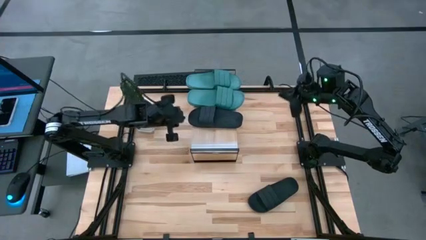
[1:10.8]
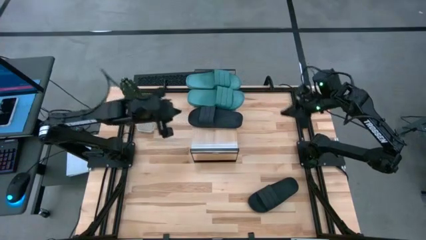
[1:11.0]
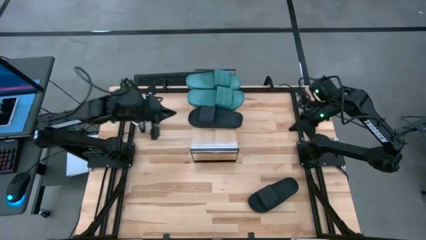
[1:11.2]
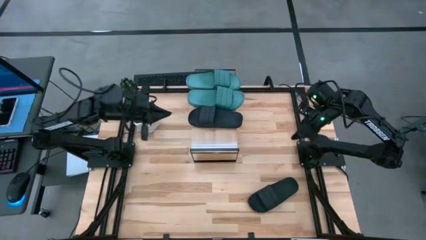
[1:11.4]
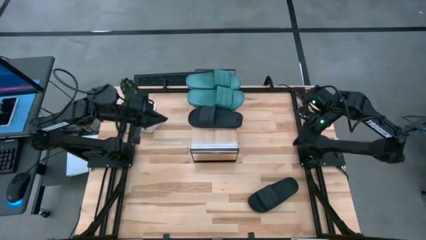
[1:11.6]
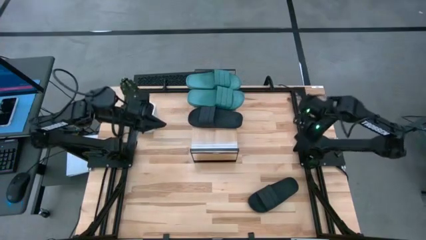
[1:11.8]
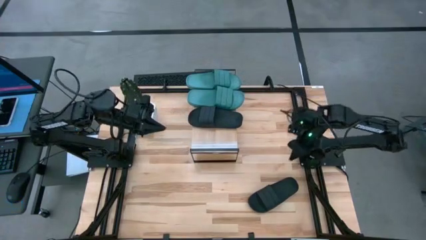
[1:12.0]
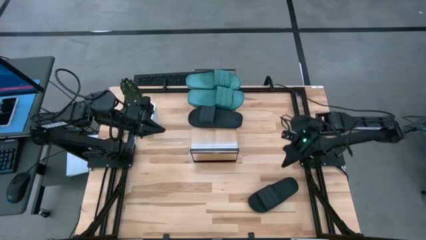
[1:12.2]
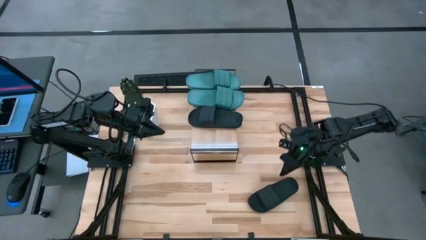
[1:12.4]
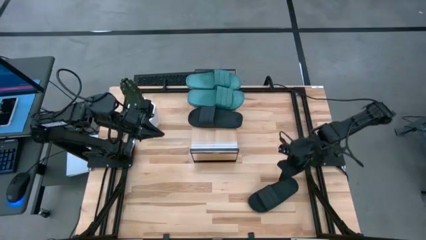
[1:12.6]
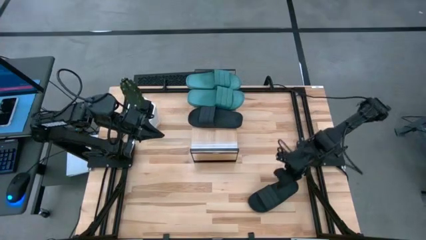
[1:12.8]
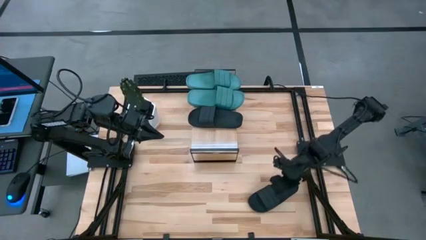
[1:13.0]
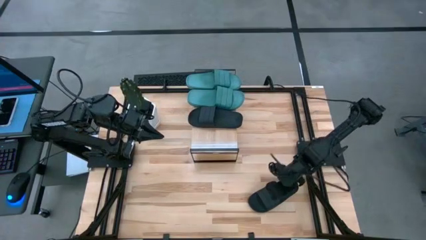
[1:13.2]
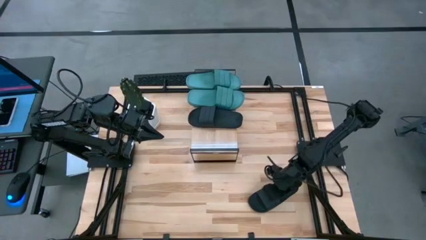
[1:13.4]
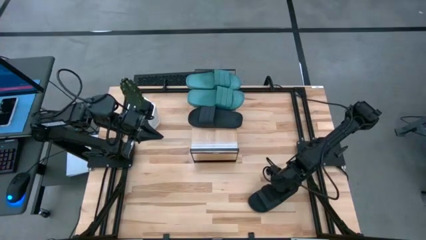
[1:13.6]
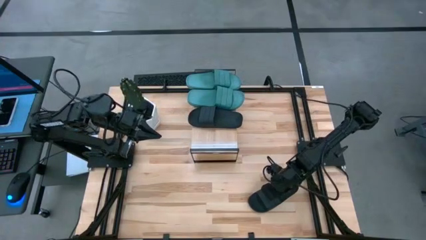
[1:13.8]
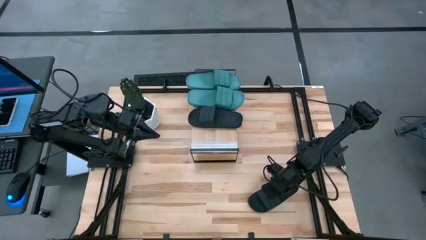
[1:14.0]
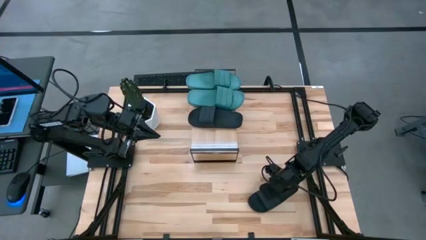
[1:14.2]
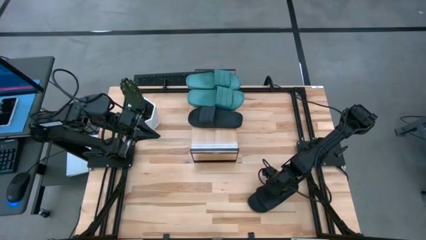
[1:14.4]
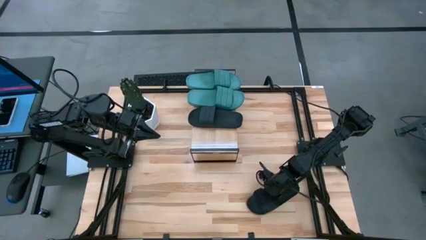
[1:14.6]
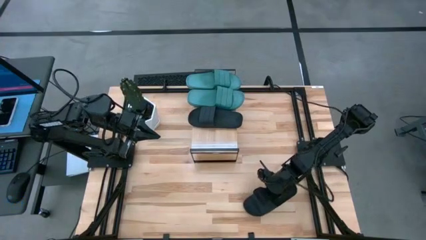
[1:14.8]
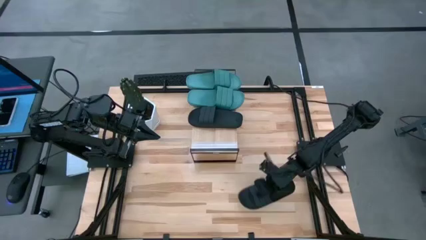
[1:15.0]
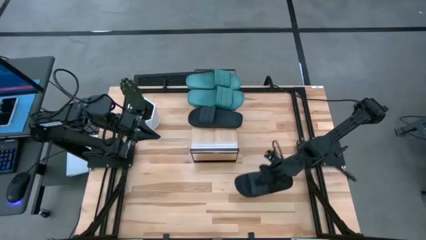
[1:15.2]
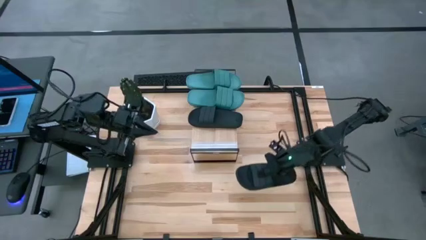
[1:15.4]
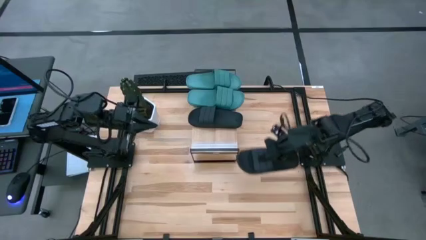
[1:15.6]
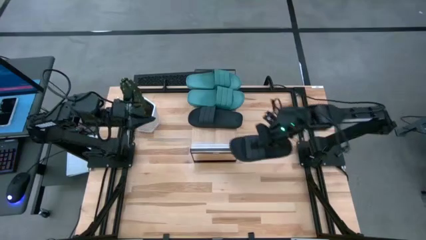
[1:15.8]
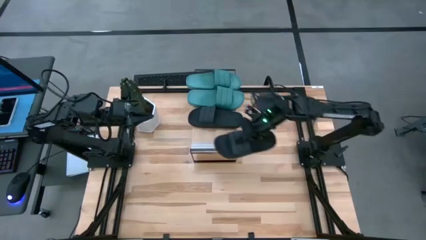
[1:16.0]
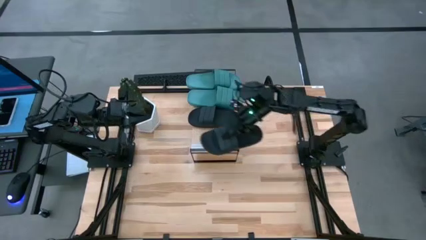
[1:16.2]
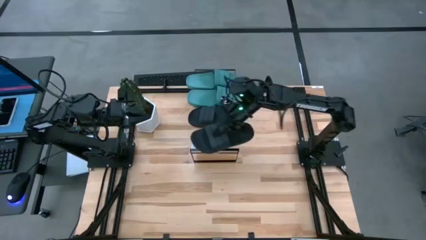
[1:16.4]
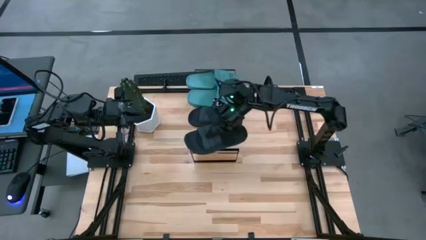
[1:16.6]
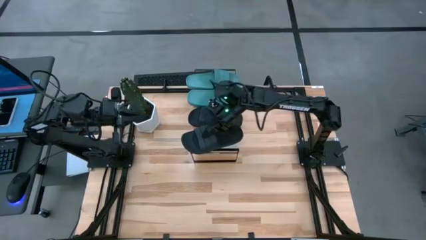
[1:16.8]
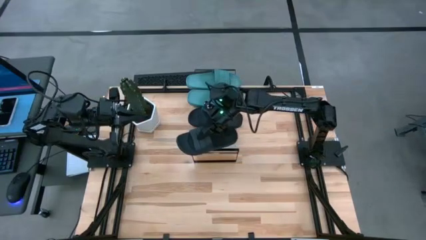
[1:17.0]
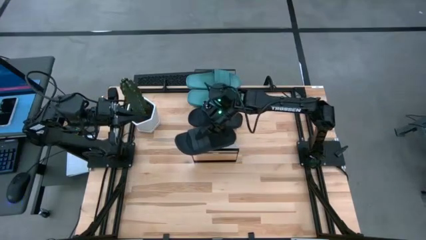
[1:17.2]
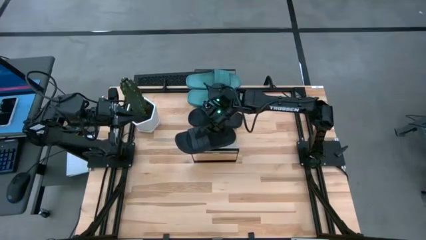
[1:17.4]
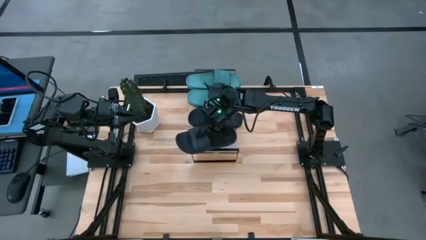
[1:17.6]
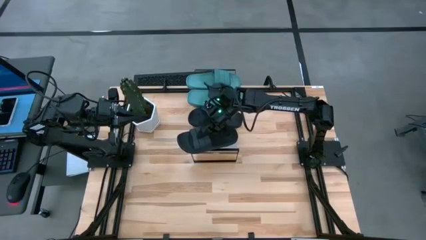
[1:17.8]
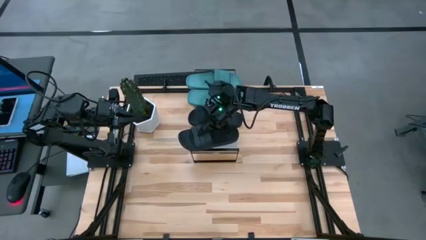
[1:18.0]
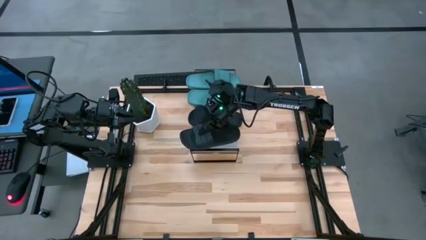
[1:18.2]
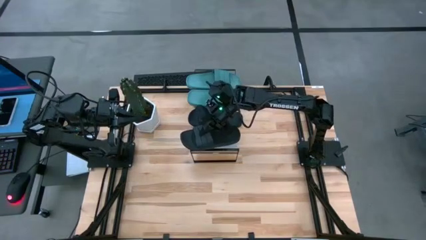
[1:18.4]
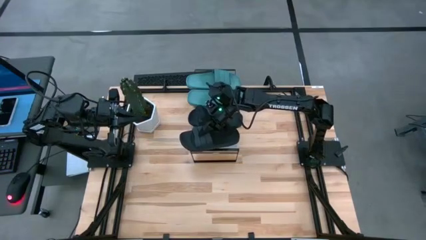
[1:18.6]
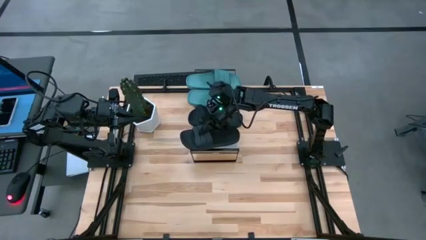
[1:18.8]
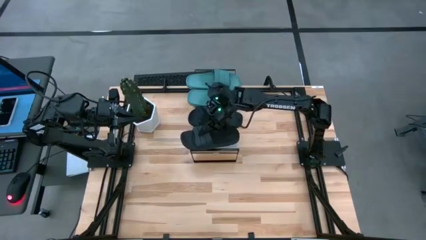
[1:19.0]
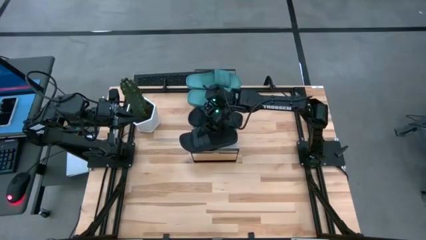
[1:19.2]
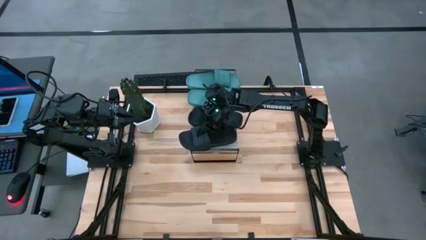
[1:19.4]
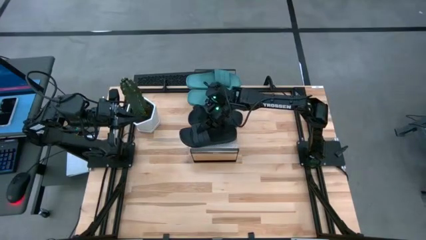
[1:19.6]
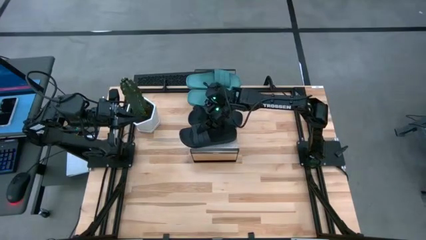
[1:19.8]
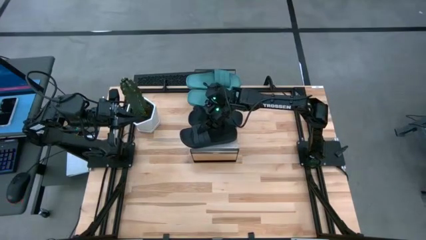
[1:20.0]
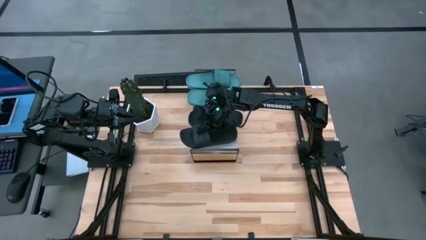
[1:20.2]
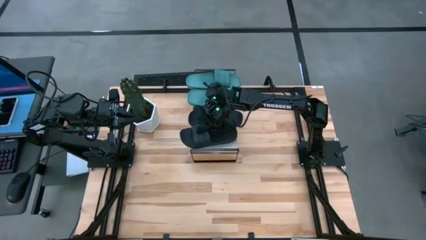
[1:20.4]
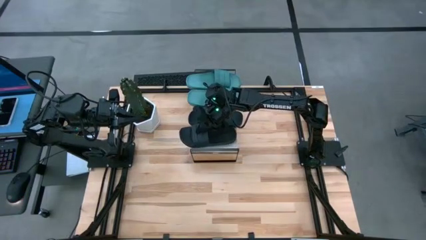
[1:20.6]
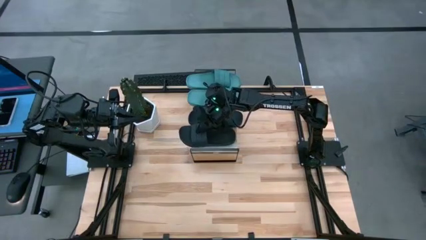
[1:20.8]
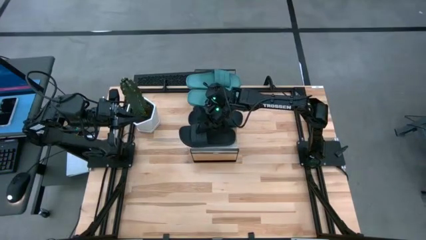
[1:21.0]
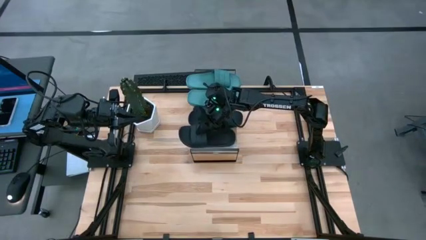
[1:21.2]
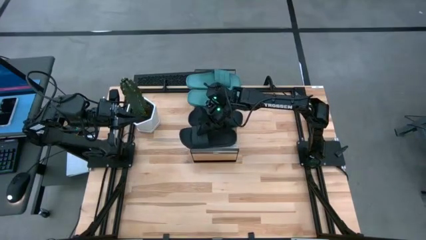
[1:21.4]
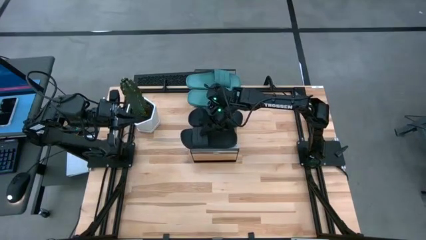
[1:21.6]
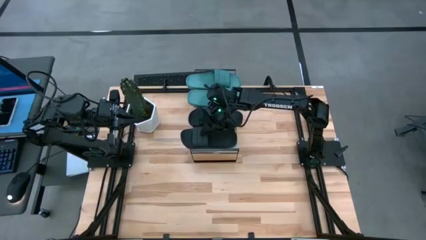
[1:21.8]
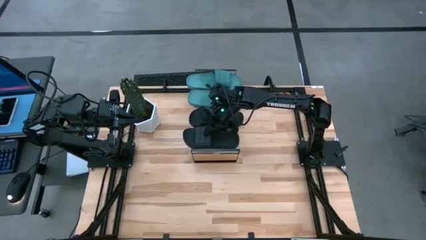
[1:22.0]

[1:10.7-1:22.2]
Task: Pick and place slides into the shelf
Put the black slipper on the shelf

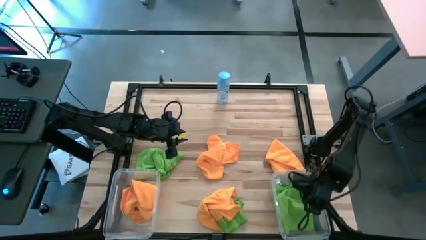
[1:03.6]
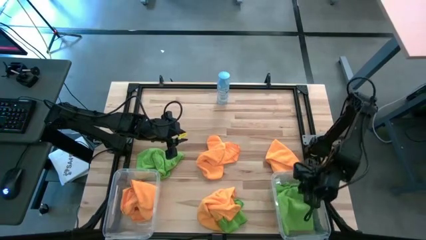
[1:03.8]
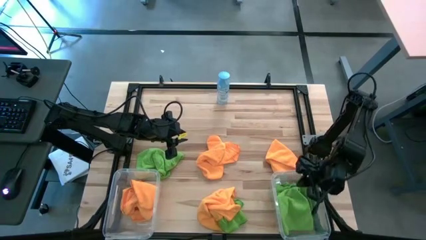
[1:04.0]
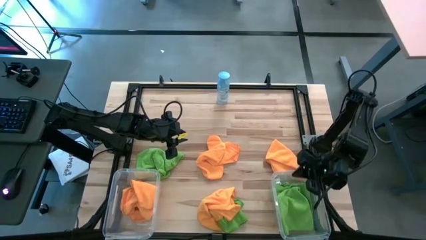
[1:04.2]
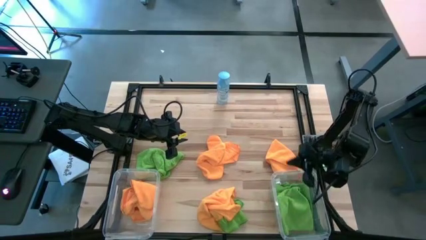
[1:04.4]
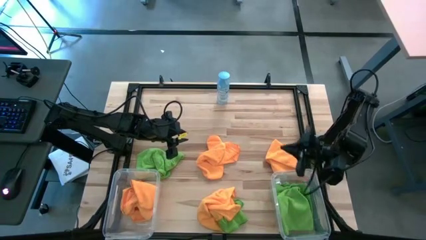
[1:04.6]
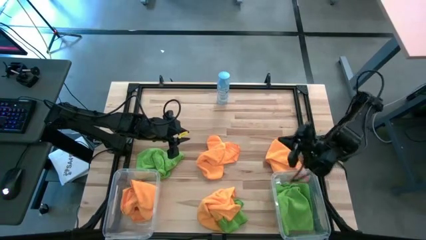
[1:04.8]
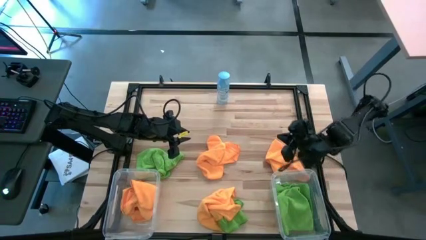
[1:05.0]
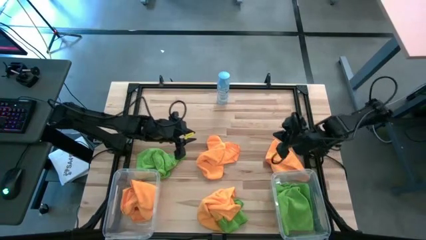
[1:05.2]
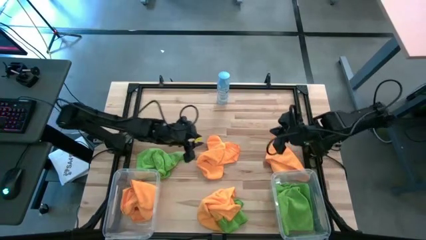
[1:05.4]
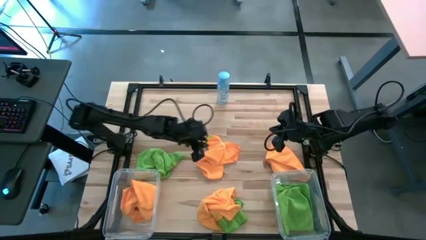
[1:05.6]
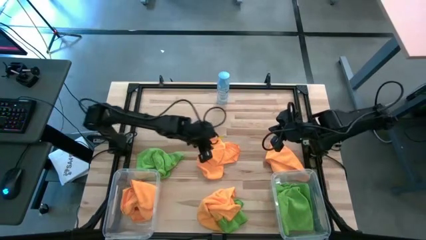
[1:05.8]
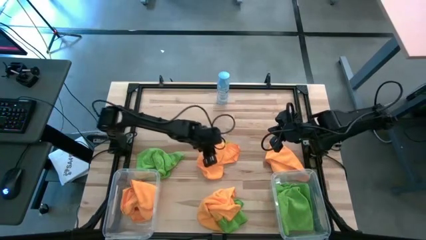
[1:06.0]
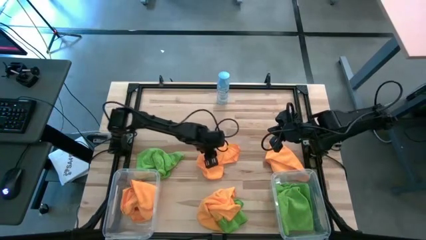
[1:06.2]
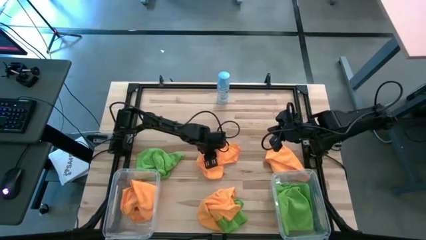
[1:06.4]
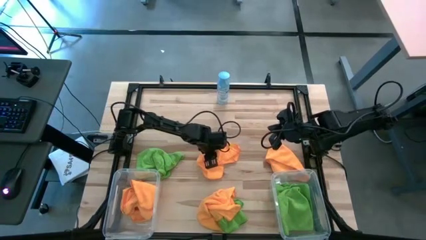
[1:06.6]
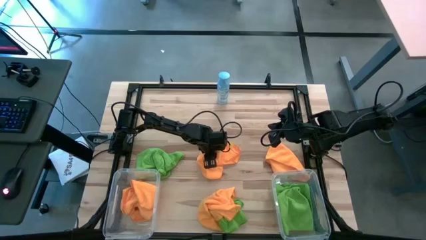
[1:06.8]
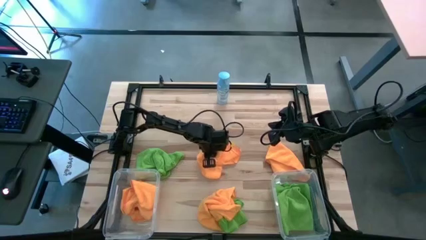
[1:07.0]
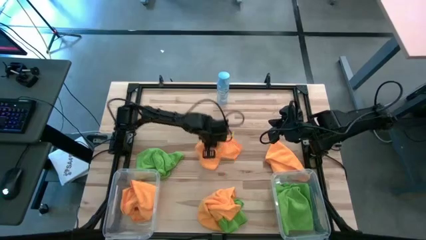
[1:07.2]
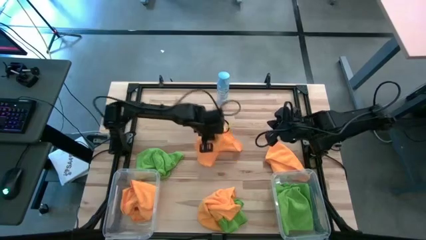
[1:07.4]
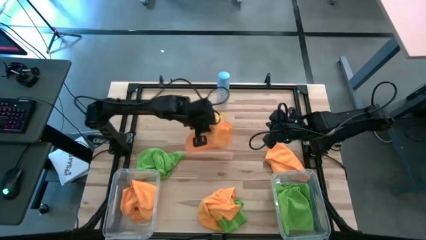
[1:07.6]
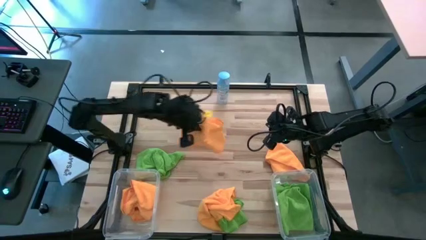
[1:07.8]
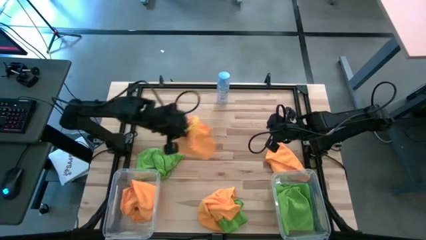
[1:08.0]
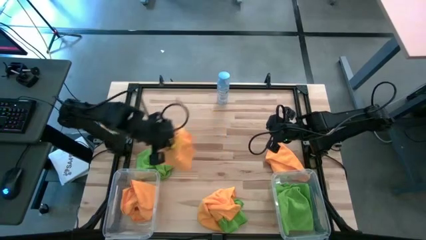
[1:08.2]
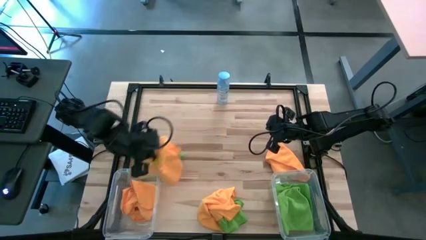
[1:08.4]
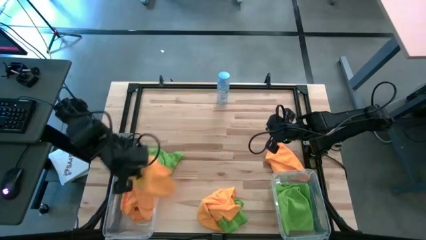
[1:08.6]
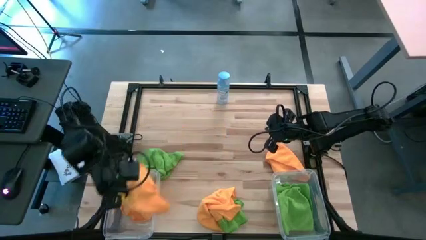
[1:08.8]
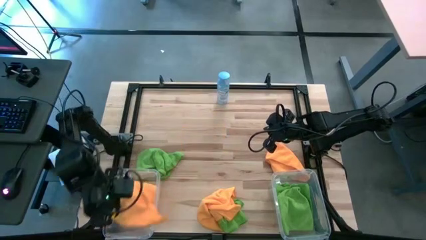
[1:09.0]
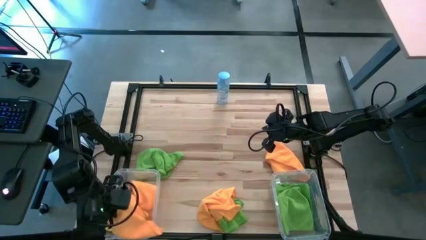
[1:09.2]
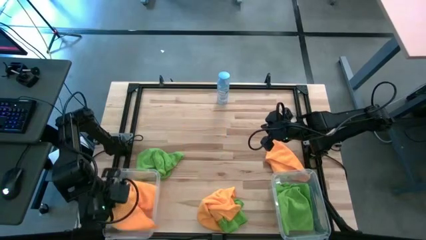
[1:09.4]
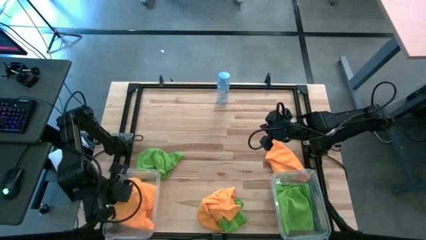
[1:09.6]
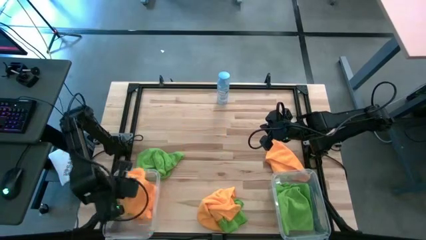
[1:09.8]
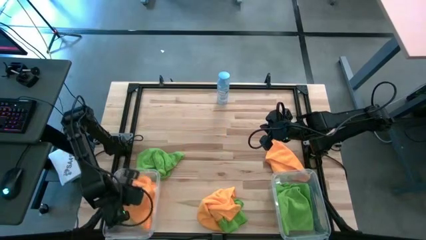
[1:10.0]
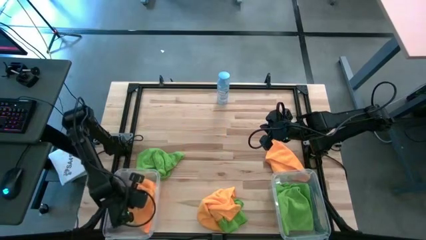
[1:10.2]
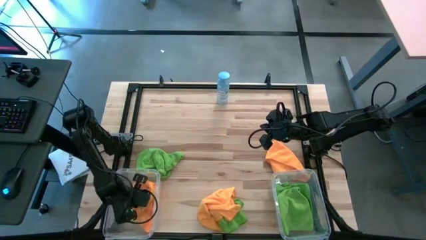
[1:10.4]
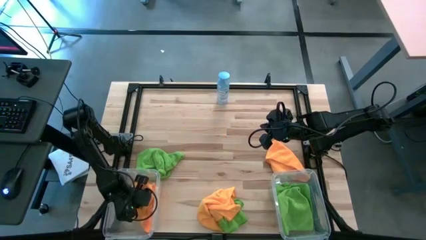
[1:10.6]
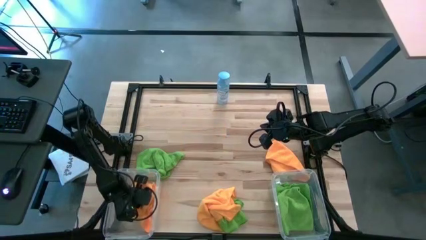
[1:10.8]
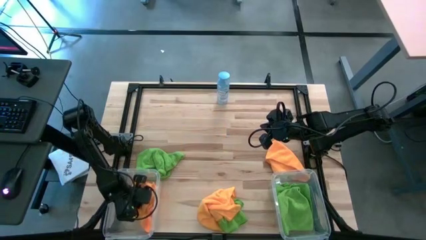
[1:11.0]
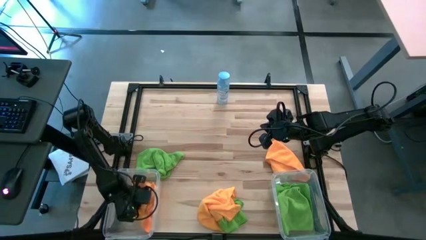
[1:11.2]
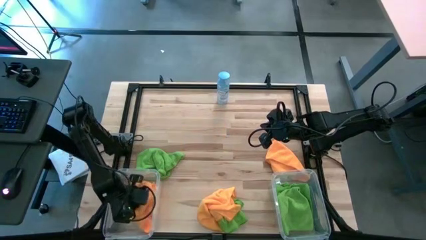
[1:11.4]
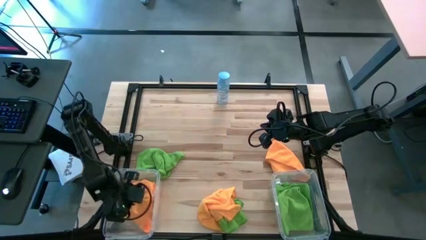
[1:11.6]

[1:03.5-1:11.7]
Task: Sort microfiber towel by color & place in baskets
Put the orange microfiber cloth into the left transparent bin
